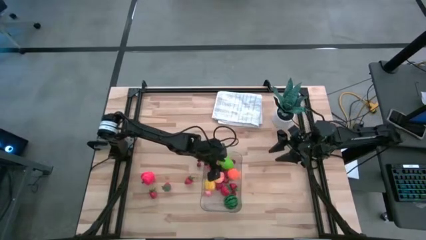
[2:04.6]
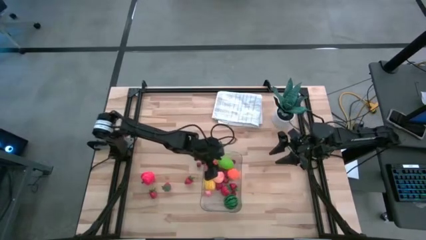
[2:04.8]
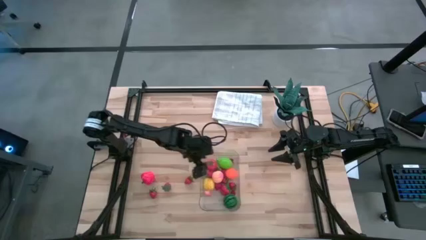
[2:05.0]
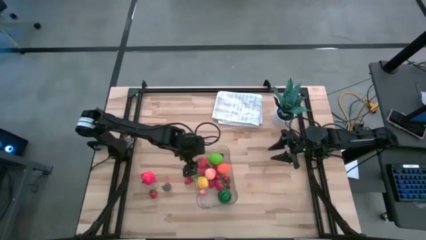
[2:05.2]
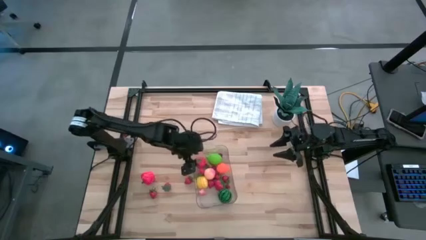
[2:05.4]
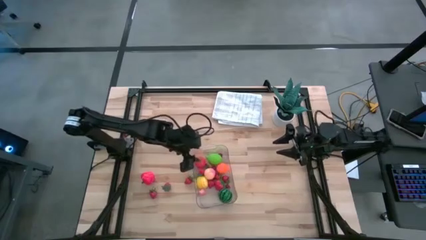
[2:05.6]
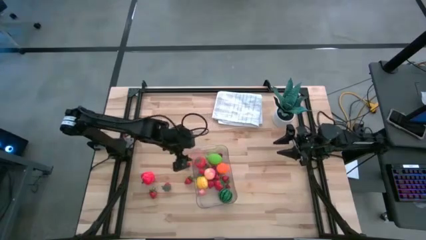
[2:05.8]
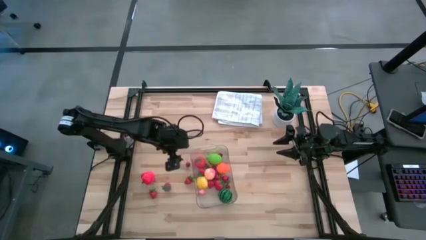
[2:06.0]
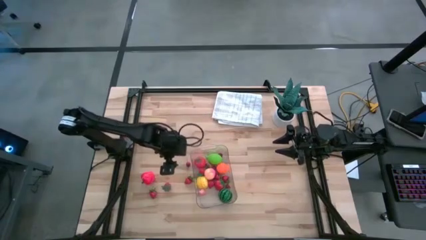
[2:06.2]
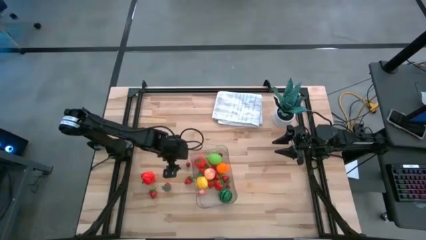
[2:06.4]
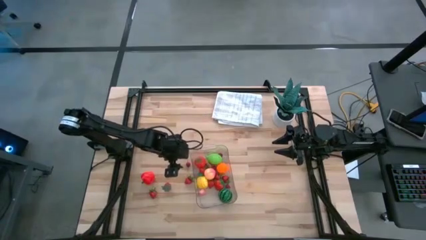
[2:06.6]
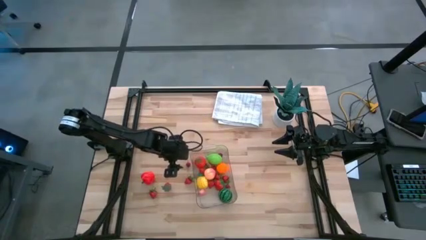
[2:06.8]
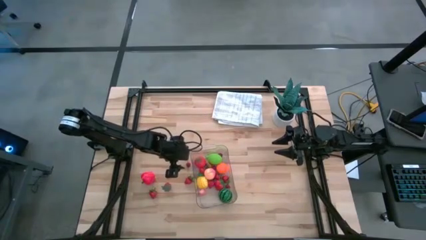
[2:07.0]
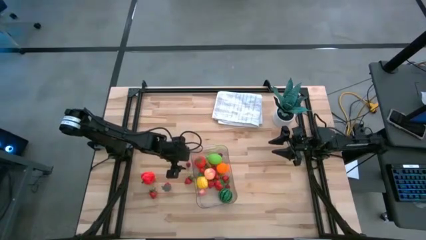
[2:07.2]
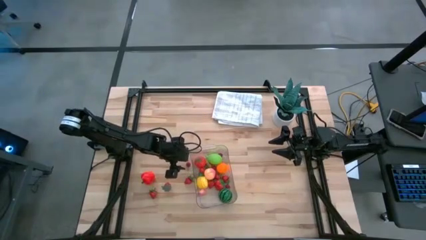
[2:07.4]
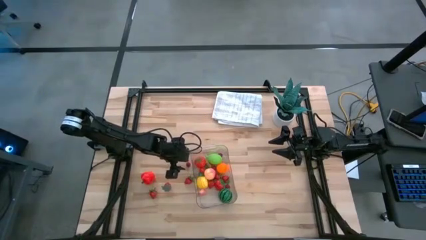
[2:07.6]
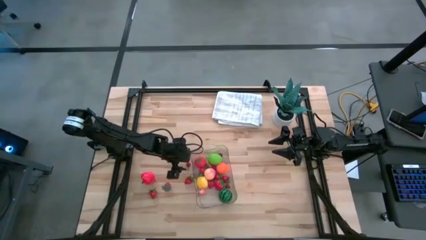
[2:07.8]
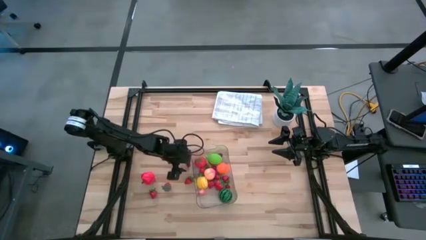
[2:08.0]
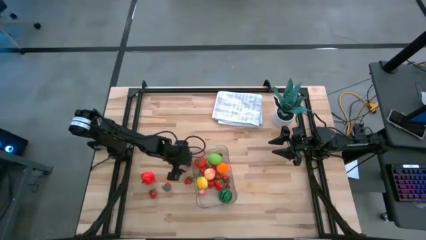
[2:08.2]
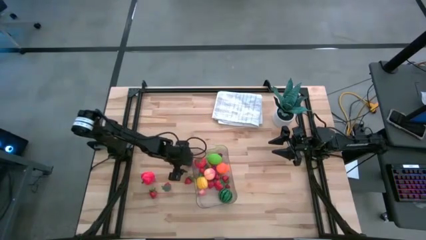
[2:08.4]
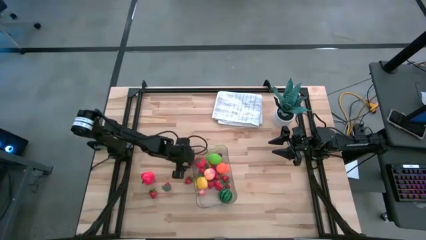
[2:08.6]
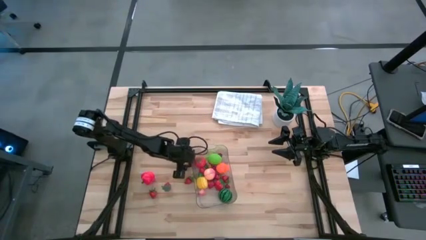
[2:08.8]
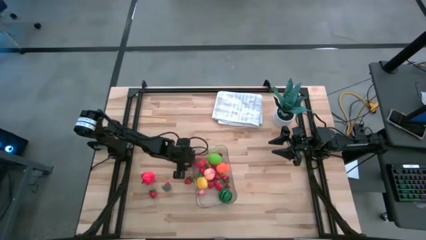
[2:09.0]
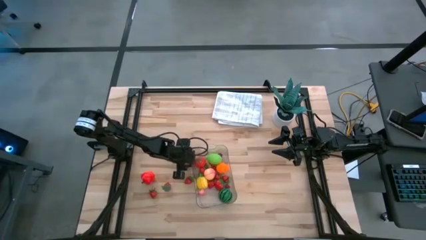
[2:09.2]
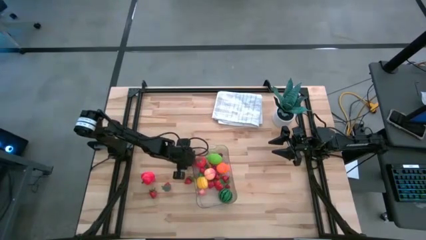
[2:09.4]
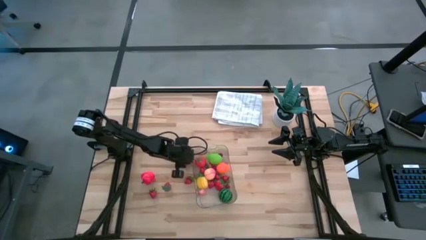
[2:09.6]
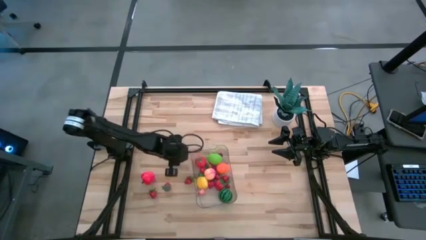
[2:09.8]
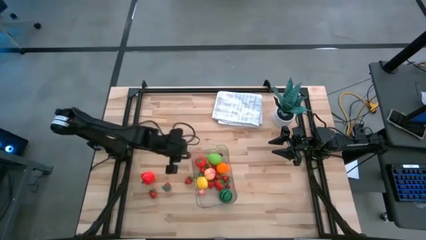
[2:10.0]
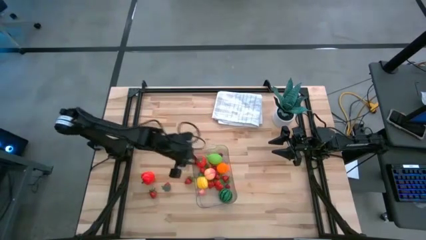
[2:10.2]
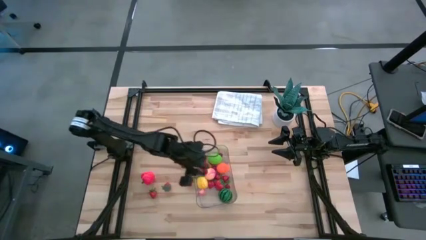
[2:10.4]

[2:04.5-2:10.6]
Task: Pick and placing Produce into tupperware
Put the red cherry into the transparent bin

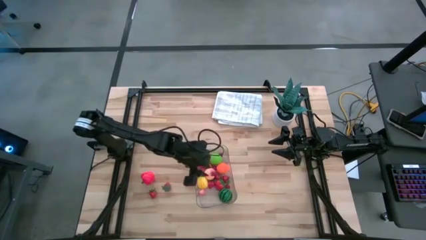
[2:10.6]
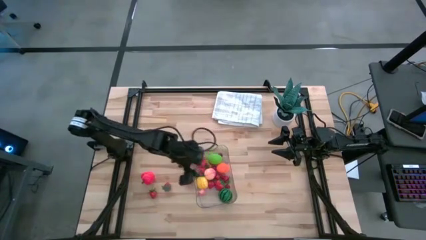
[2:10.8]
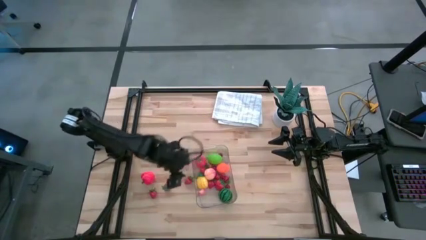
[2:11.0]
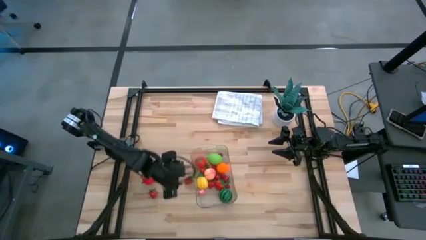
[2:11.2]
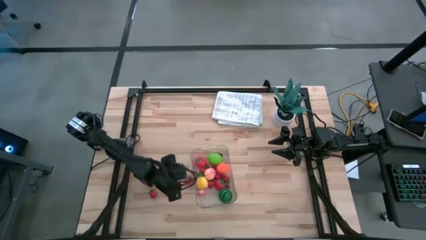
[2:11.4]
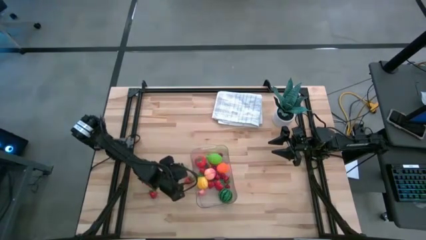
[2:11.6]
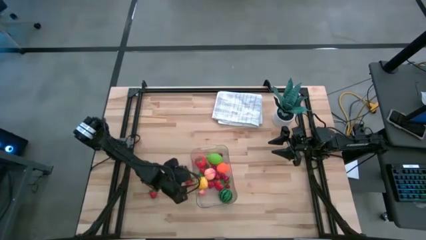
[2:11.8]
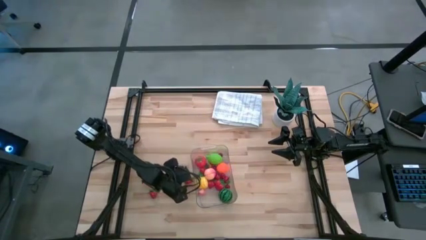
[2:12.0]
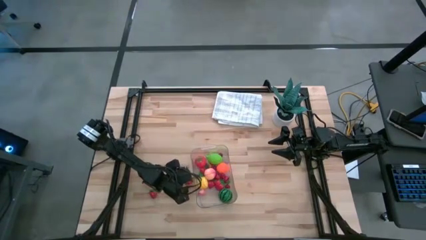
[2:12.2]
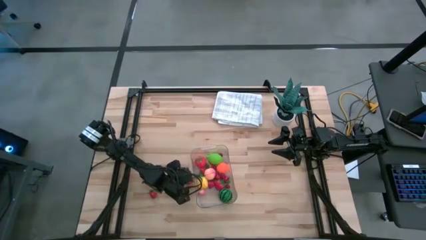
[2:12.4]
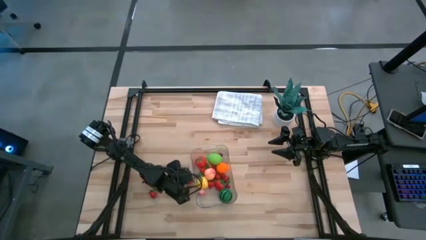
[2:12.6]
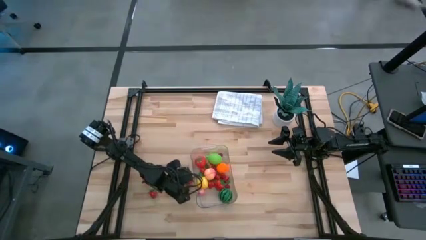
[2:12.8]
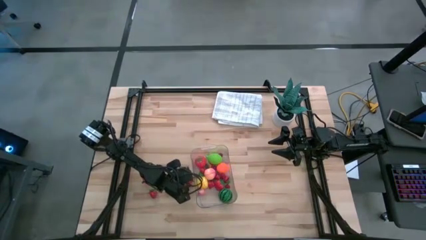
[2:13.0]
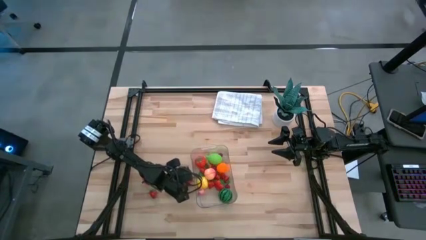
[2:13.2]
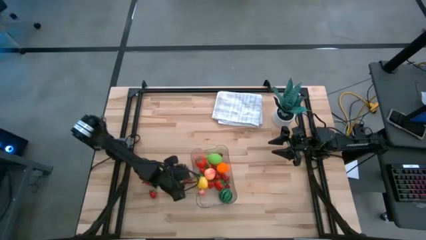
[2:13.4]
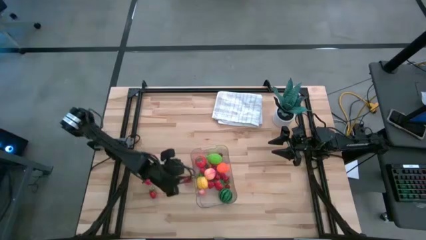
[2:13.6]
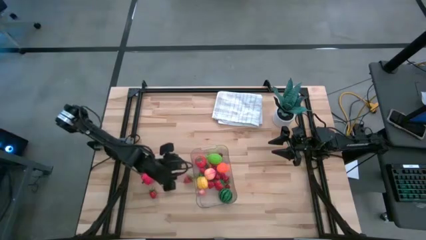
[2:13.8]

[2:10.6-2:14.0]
Put the red strawberry into the transparent bin

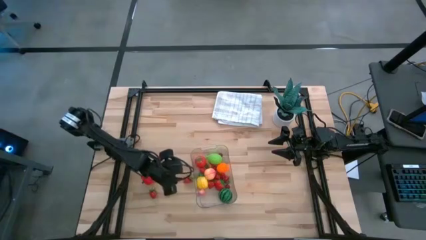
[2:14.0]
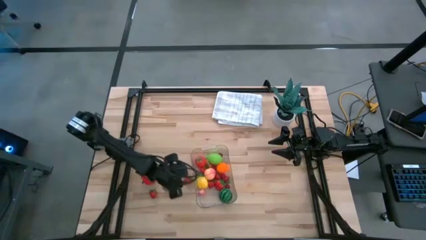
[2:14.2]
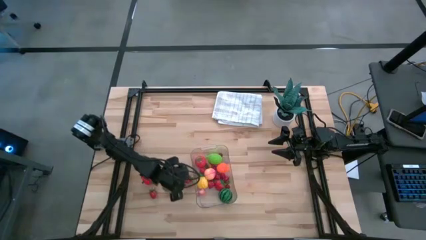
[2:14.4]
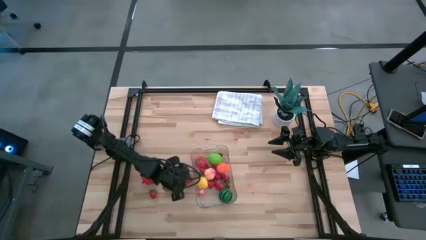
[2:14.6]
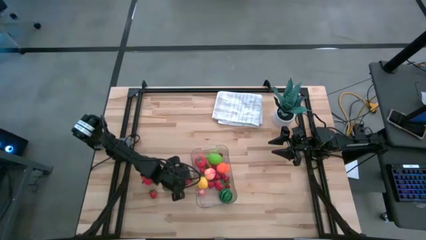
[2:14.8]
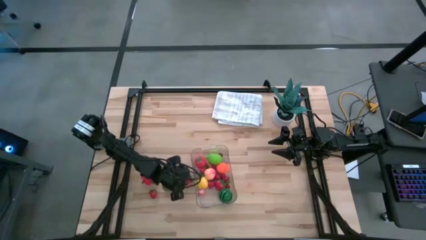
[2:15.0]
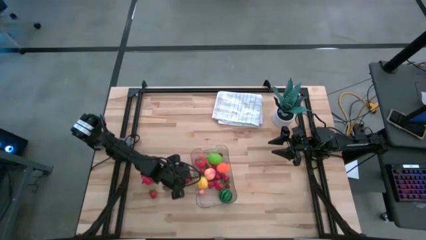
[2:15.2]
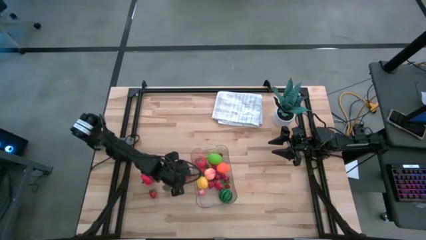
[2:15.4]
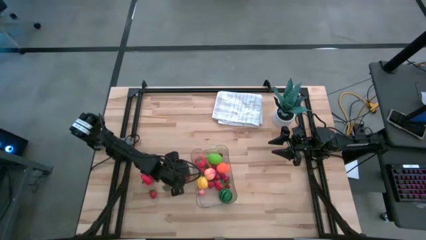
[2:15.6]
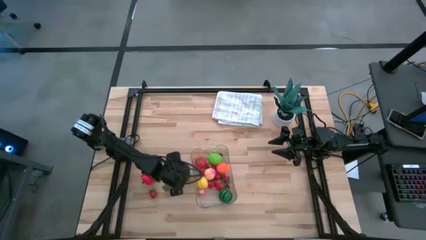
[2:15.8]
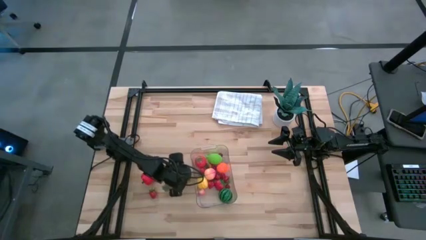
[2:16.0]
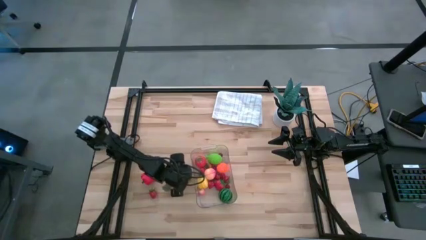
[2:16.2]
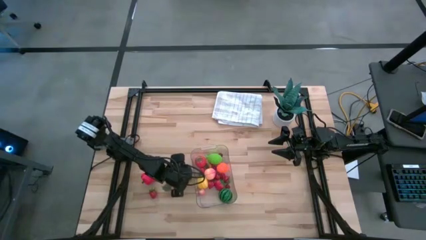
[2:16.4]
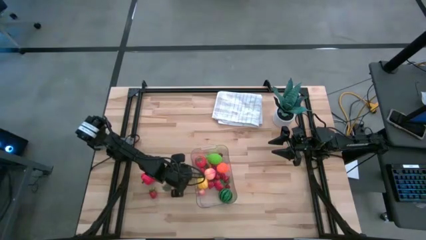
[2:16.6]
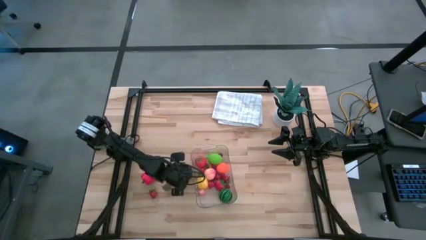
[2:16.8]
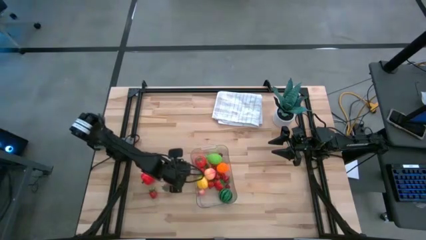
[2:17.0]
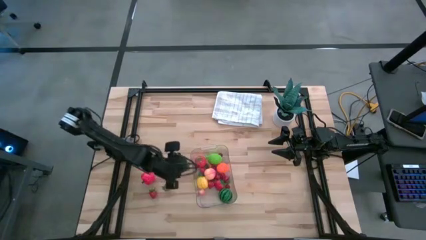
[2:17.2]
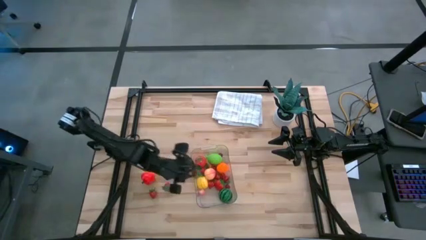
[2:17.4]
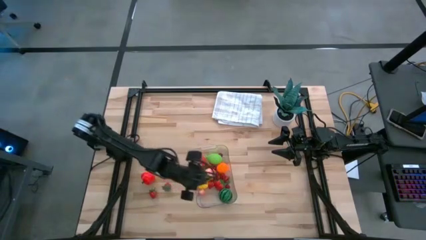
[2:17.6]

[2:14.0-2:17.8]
Put the red strawberry into the transparent bin

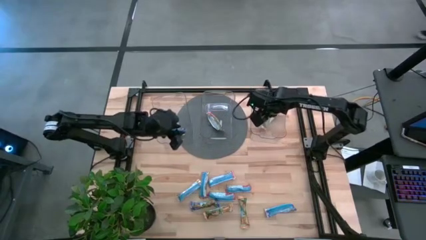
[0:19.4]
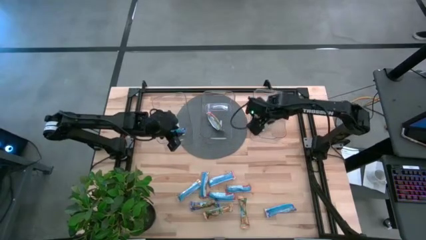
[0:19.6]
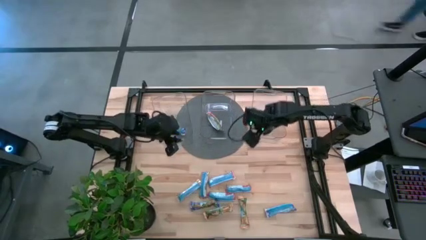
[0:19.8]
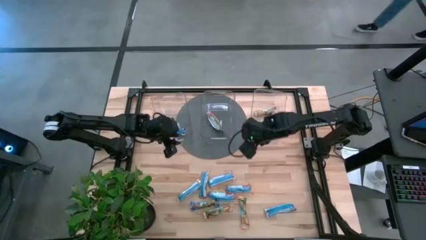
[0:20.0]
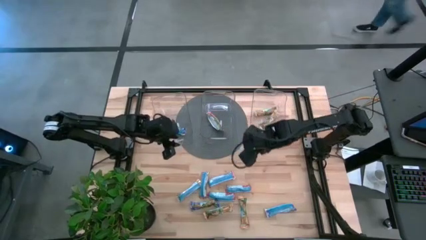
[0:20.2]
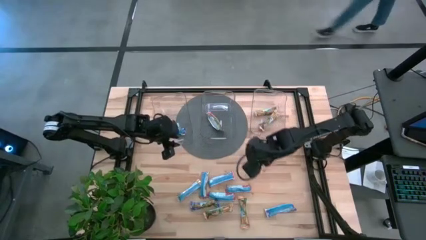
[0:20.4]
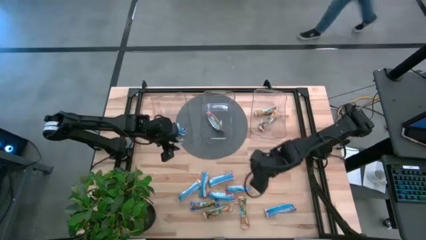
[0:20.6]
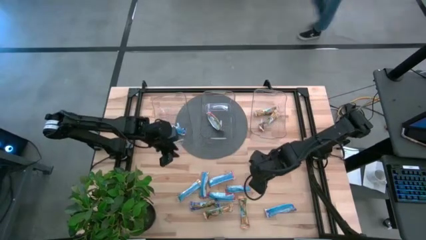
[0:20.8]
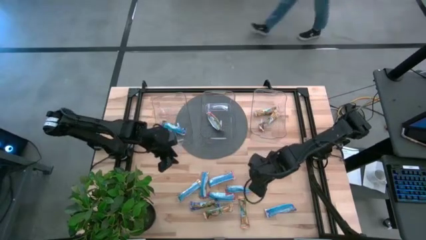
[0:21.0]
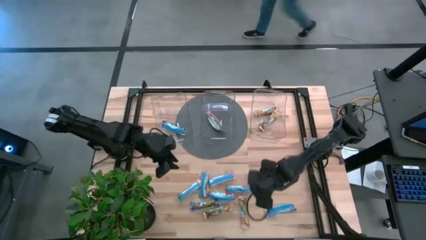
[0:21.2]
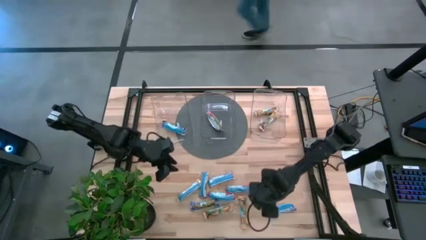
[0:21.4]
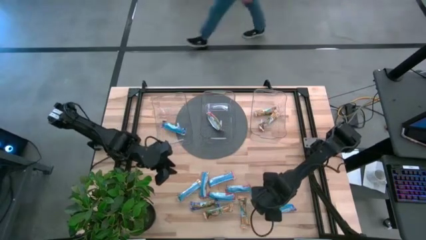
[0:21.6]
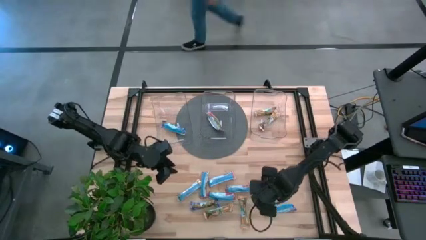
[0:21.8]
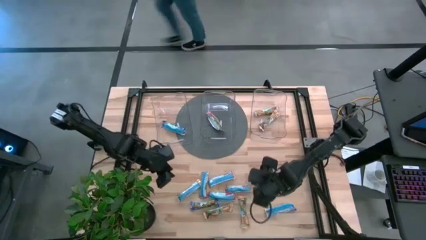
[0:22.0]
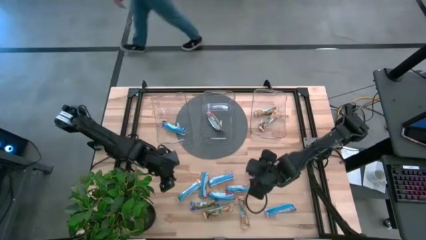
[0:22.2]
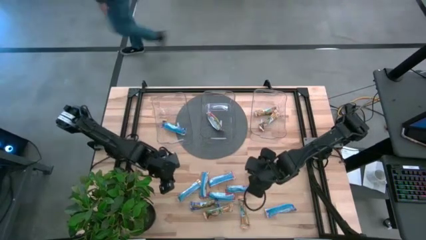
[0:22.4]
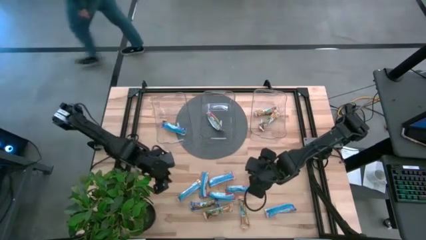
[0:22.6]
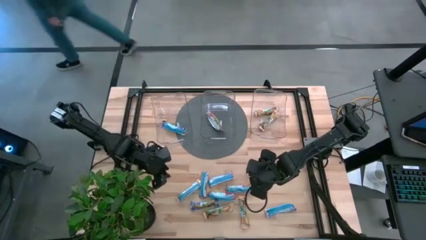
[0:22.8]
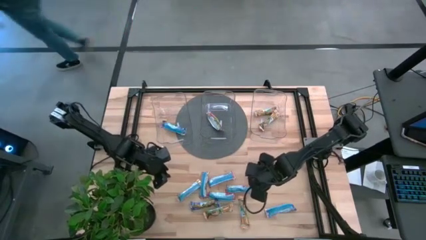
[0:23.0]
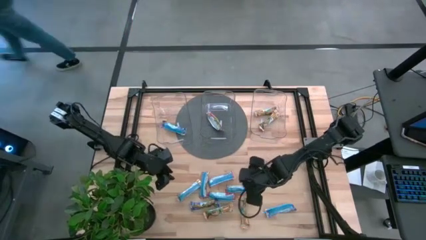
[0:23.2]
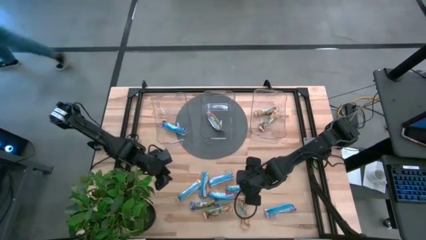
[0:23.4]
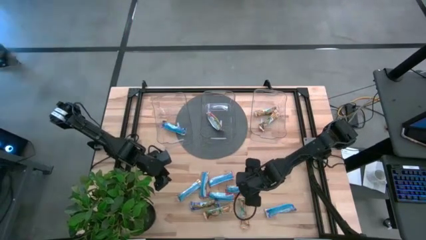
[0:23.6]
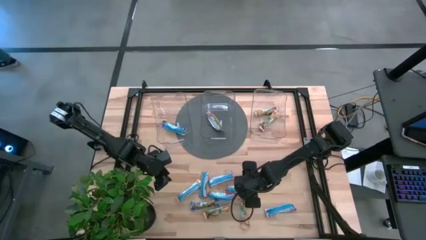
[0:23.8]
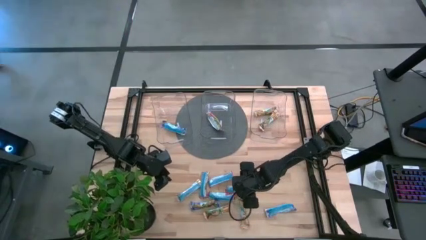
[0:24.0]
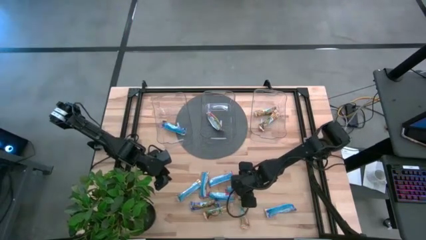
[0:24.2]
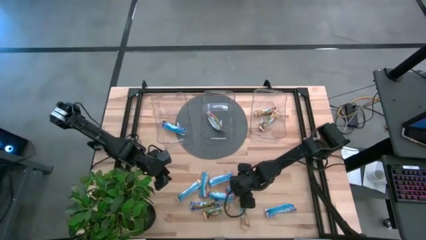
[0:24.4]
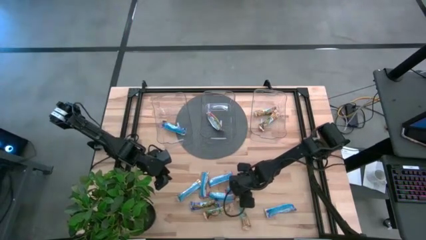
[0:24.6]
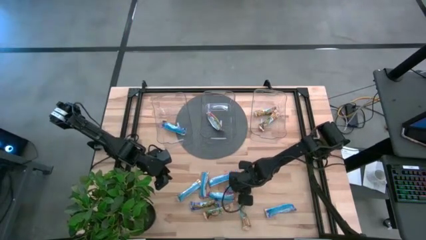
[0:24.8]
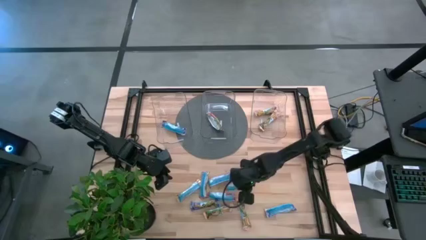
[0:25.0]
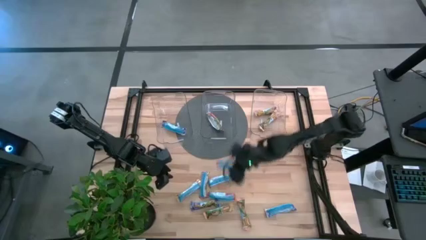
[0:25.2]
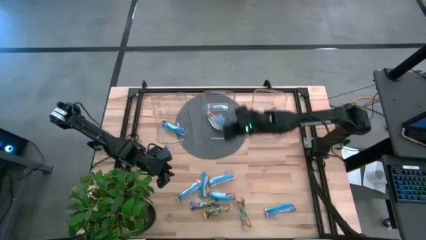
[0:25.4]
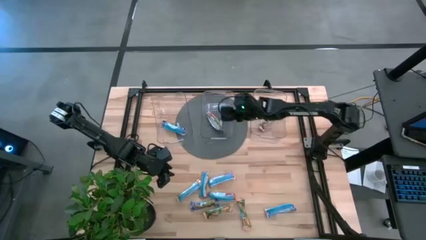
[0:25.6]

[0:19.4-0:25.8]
Task: Pick and place Granola Bars by type
Put the red granola bar into the middle transparent bin
